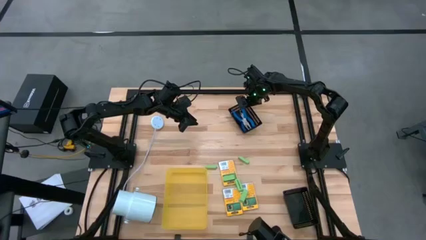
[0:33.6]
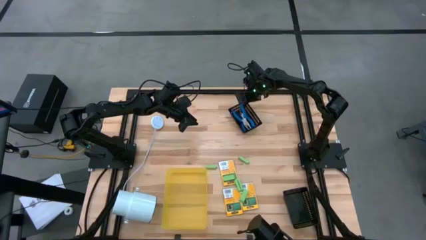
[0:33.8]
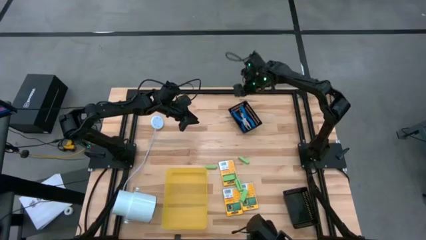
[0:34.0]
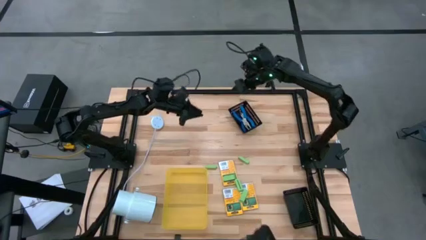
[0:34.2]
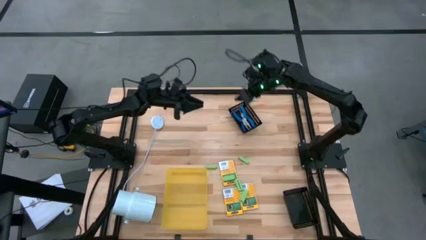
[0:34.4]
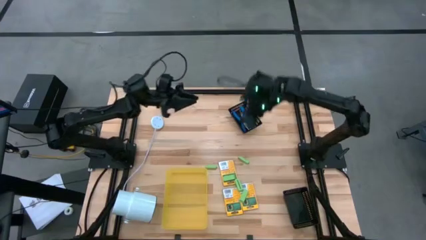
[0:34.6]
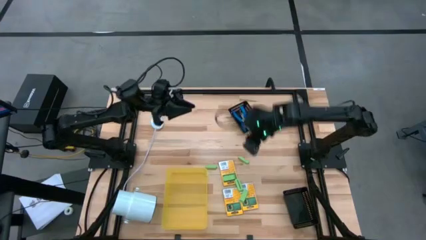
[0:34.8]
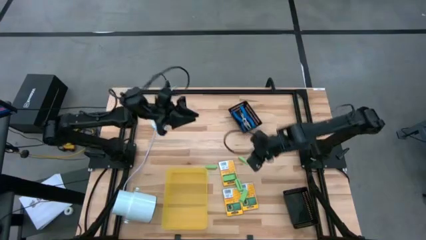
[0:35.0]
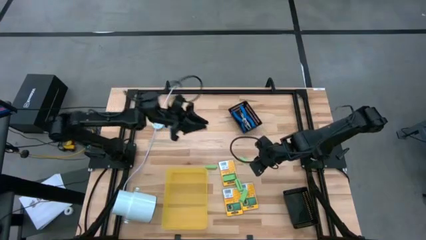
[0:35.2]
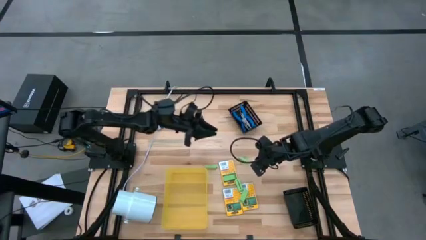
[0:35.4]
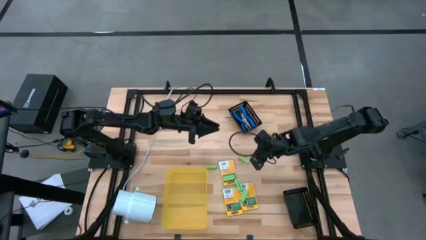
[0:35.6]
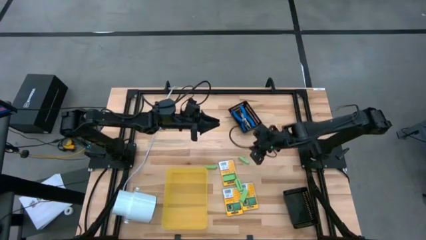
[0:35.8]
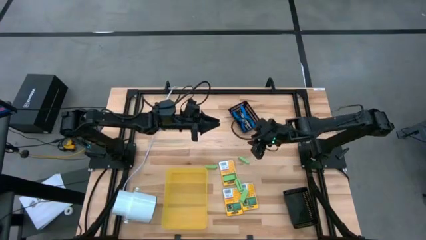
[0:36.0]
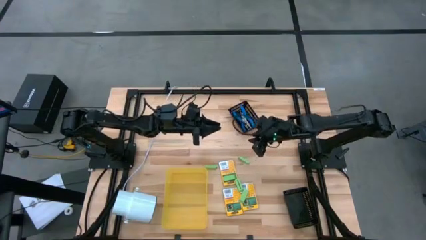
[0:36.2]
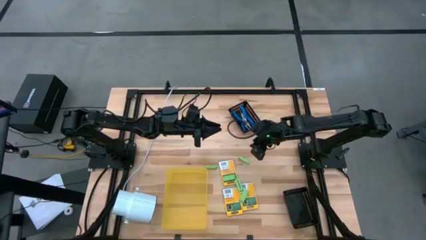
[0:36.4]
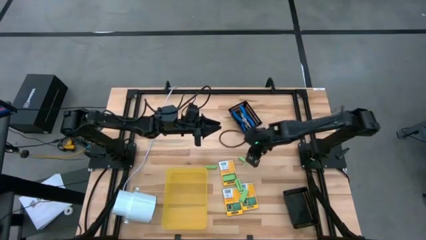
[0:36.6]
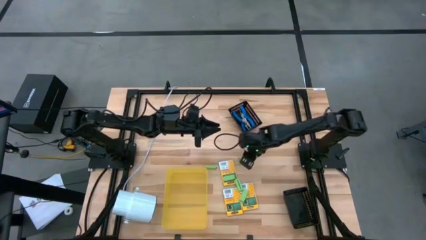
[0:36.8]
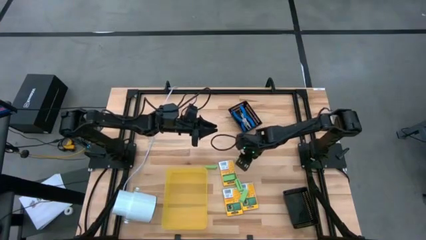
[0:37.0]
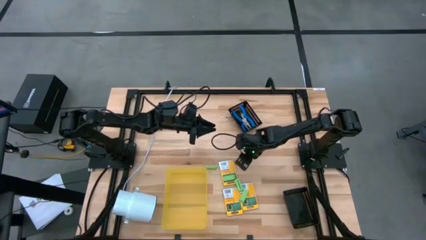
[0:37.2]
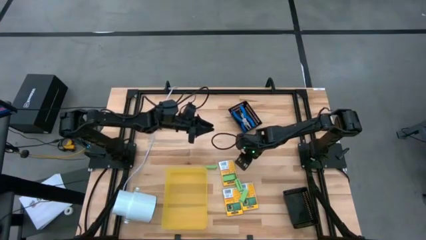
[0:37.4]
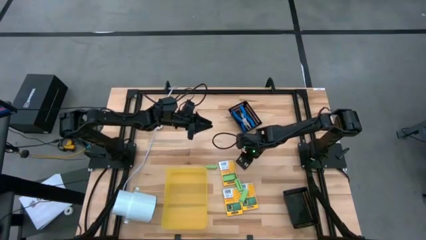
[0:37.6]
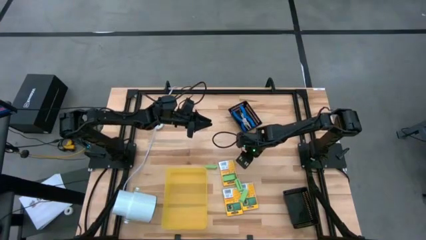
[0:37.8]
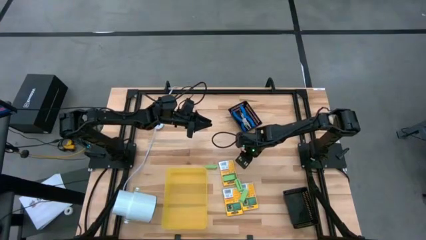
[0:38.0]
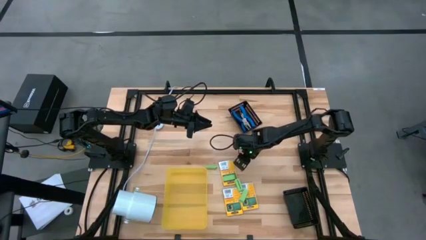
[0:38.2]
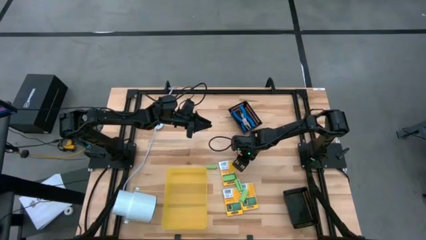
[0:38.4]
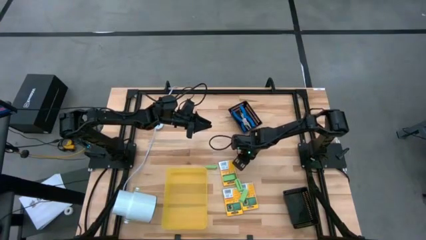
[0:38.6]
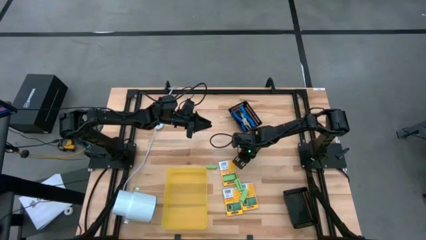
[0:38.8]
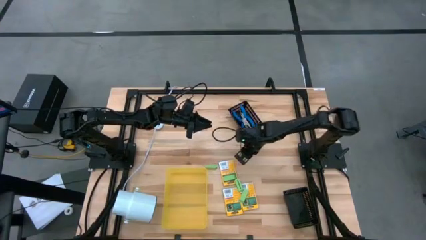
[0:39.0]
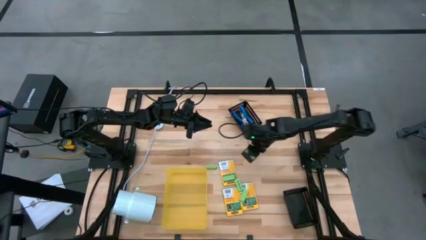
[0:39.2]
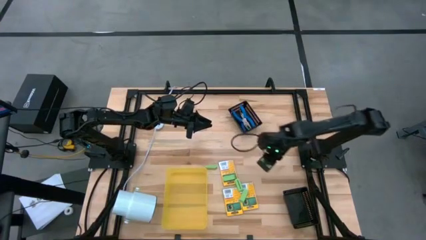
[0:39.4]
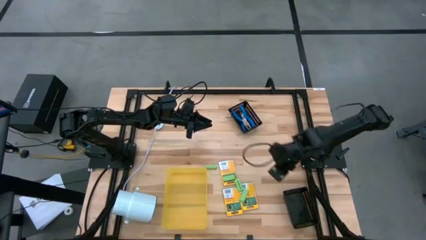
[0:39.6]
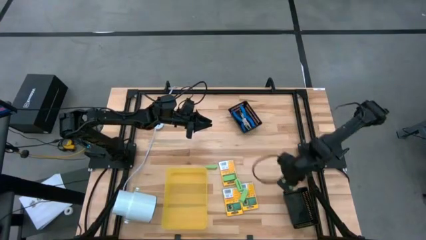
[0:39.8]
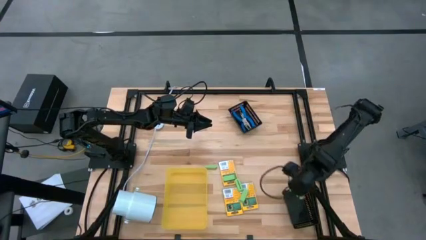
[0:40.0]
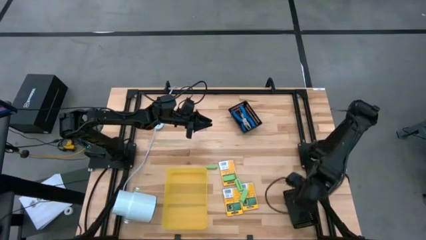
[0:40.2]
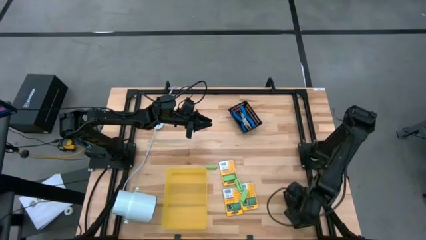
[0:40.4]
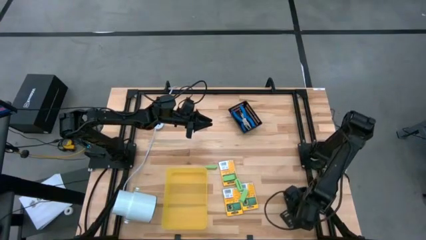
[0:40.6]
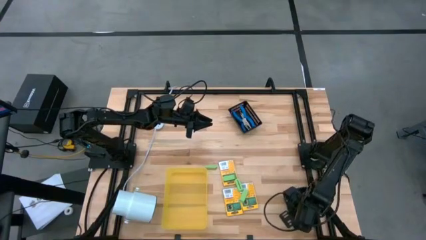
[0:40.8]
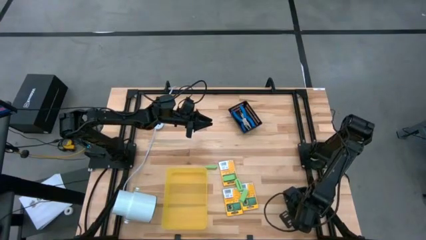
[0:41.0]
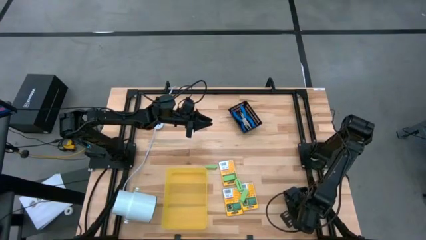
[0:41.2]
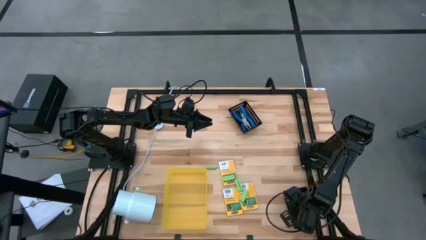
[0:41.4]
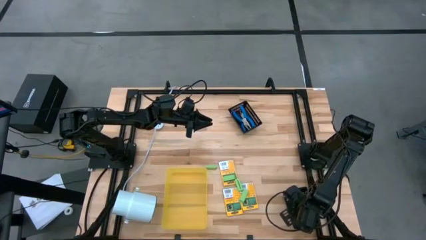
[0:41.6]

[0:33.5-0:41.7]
Task: Pick & Place School Supplies
Put the green eraser into the bottom black bin

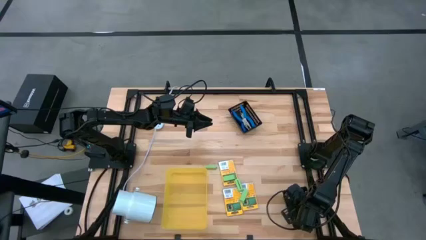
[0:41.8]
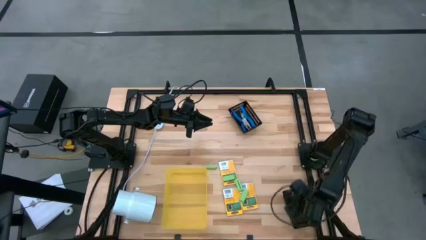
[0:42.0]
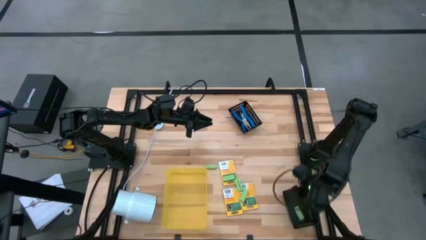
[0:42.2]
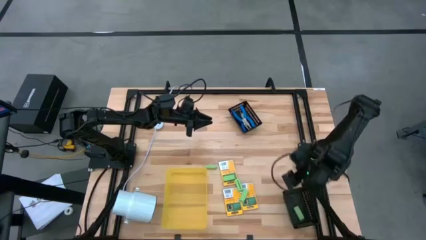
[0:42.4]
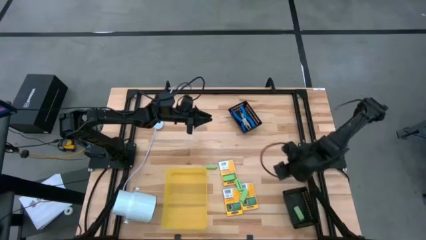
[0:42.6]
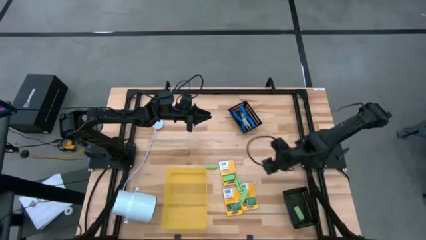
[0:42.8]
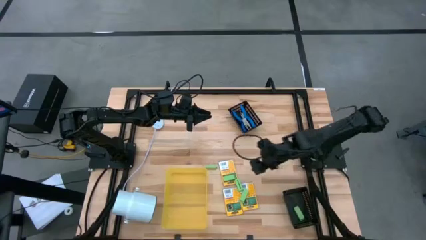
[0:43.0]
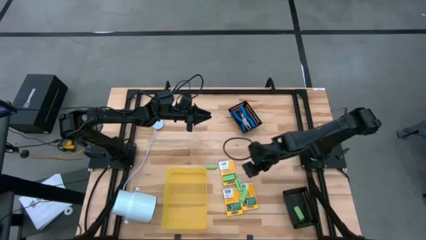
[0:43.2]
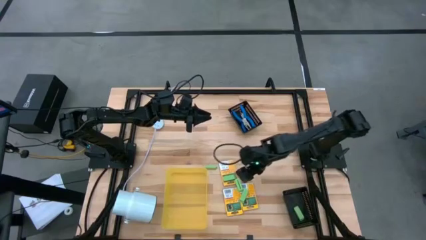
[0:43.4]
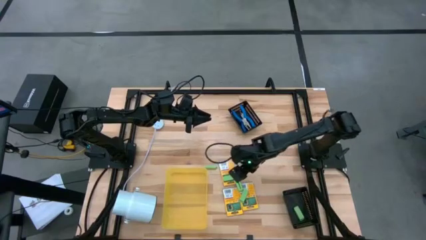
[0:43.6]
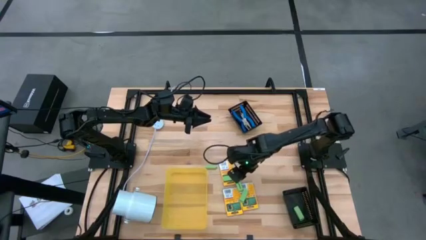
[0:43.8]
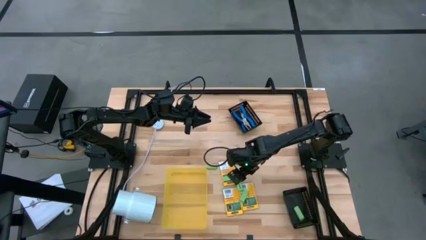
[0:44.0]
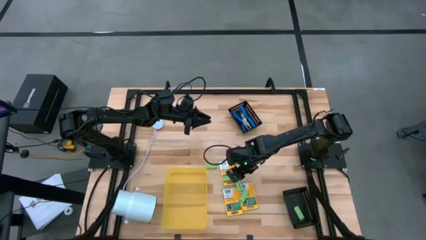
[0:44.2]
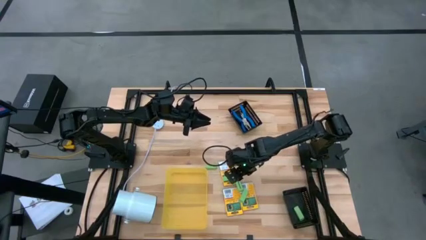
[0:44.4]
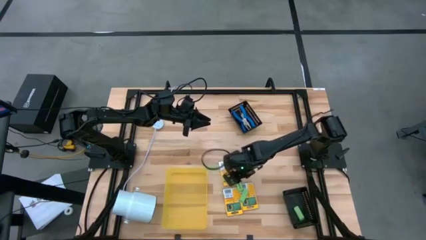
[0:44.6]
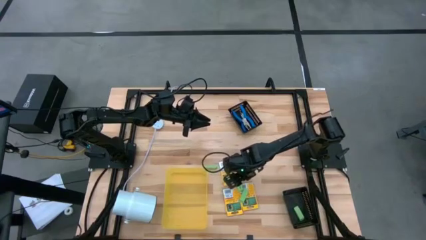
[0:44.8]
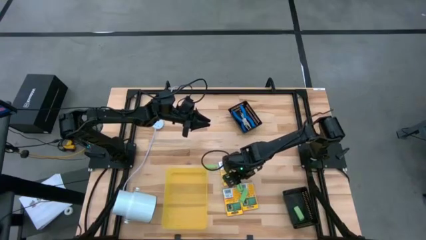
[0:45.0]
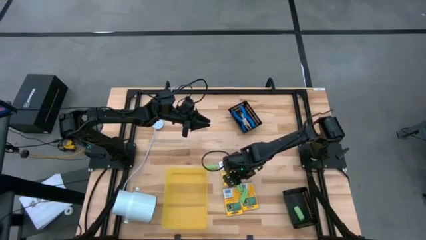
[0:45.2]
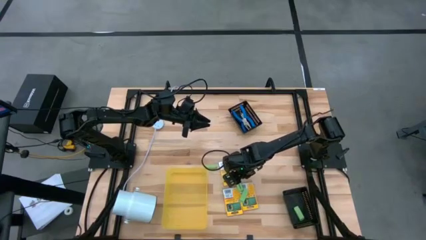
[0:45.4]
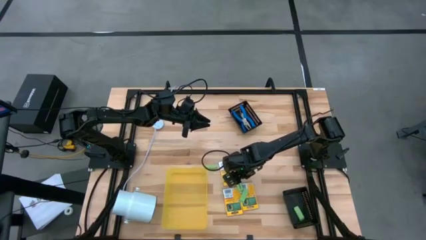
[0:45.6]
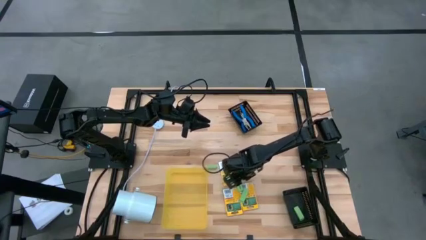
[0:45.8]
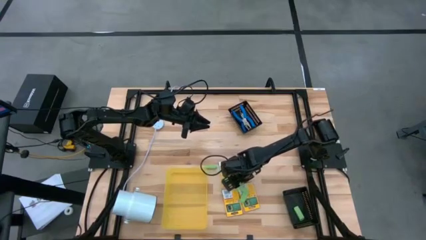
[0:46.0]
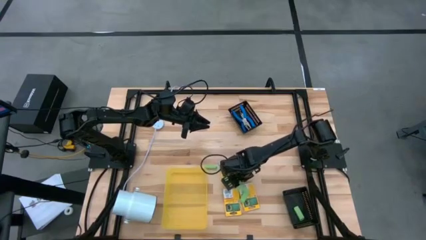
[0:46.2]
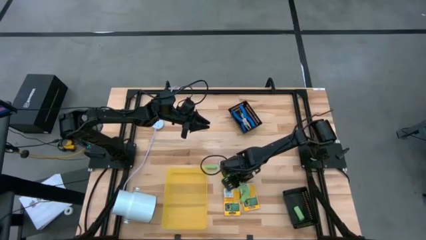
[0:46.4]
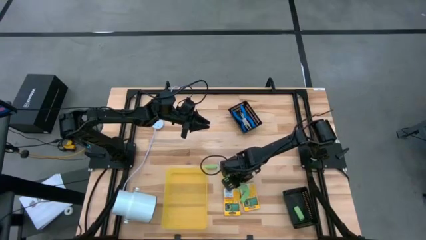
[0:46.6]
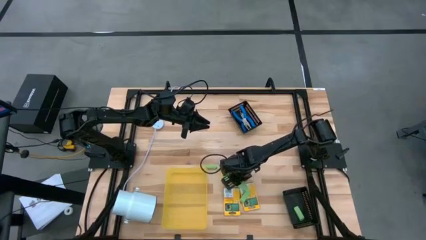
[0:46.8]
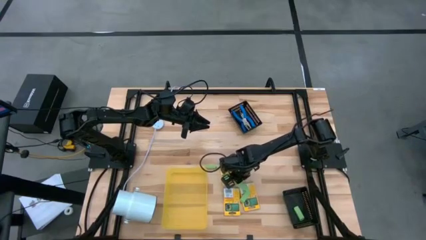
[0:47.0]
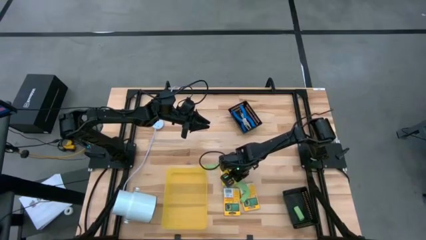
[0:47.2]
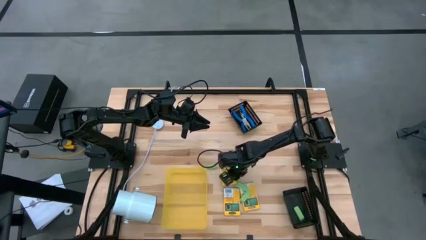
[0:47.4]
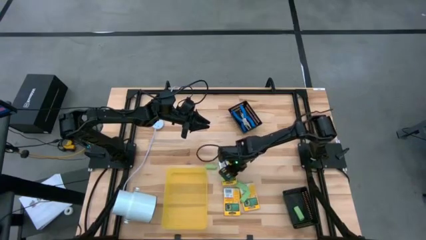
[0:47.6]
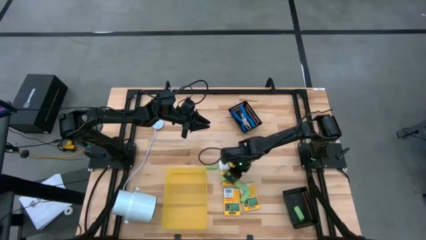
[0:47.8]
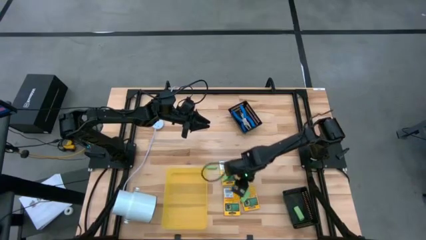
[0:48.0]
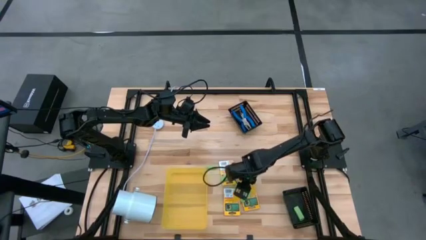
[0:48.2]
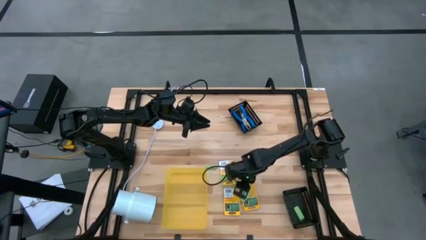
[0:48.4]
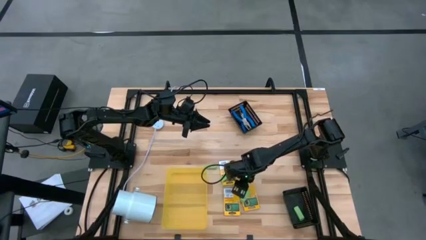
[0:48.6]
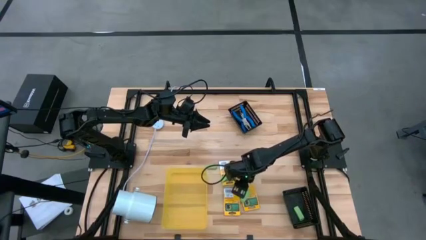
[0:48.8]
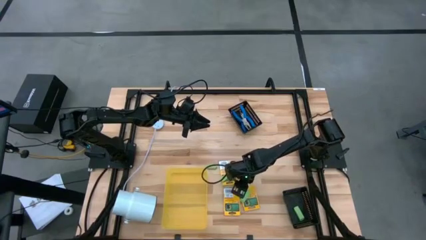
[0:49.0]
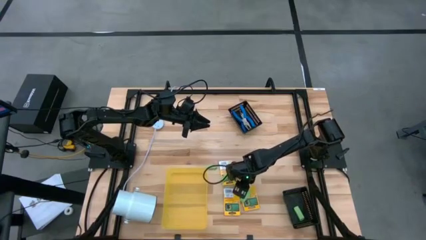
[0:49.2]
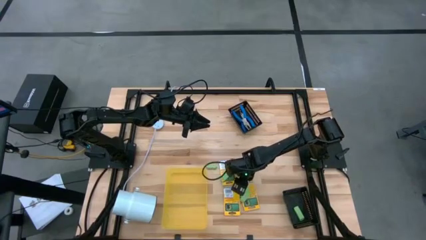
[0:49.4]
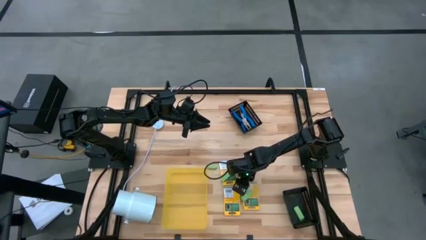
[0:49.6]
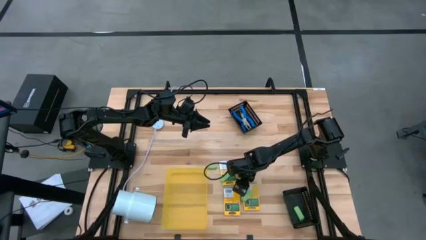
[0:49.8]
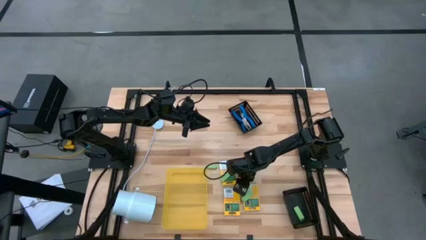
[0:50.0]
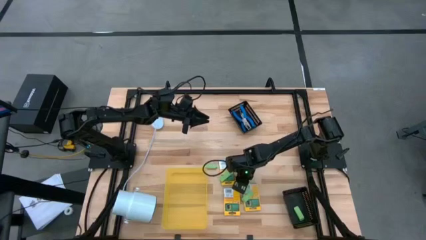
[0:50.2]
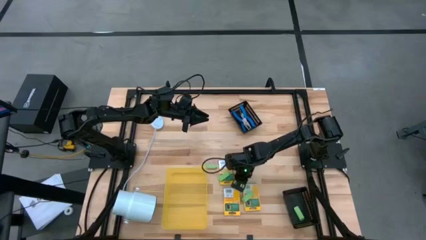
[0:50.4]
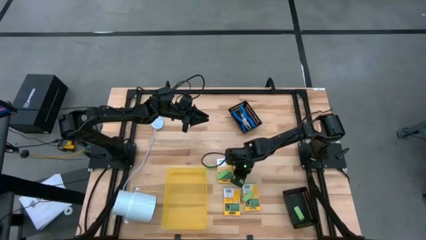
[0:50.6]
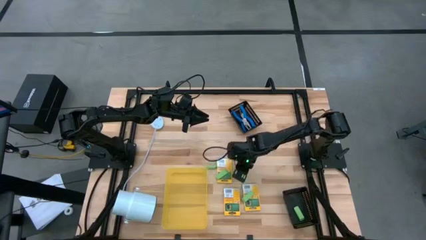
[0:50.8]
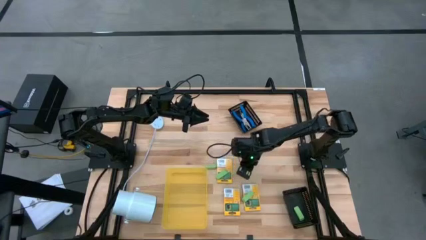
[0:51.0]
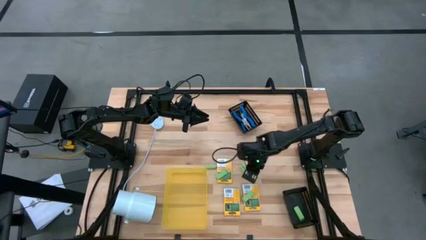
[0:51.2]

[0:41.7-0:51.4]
Put the green eraser into the bottom black bin
